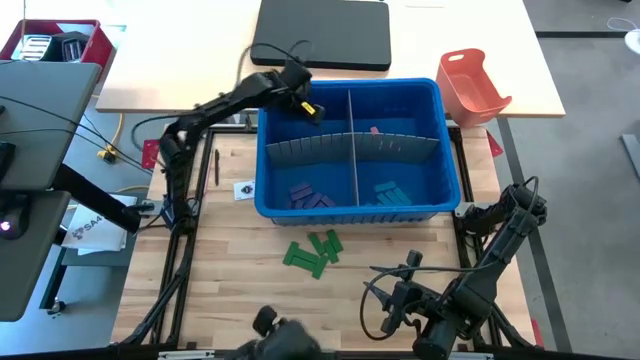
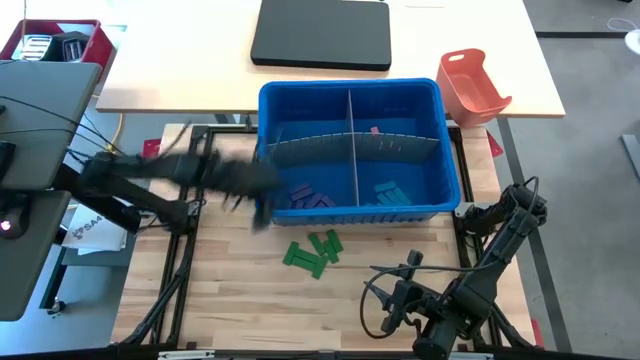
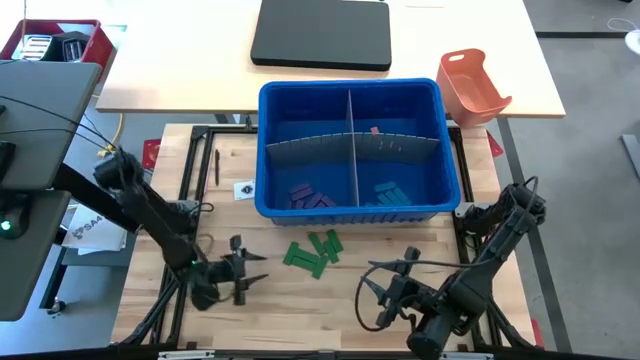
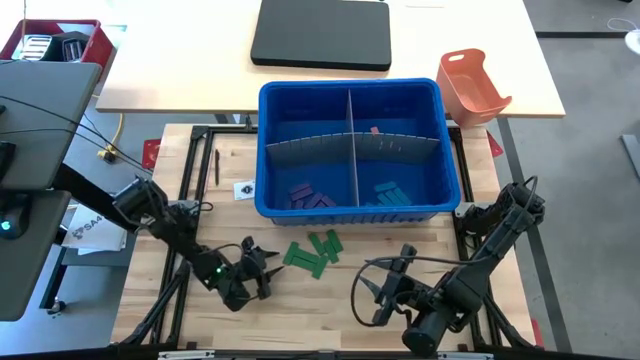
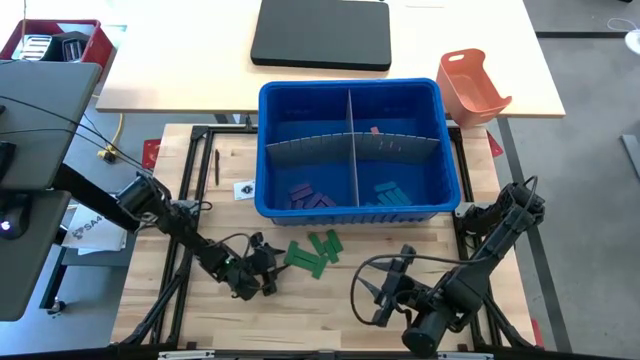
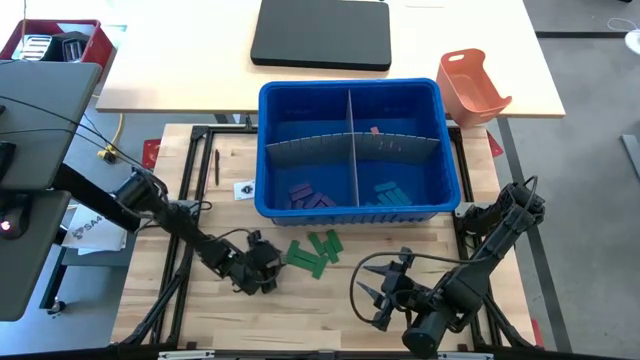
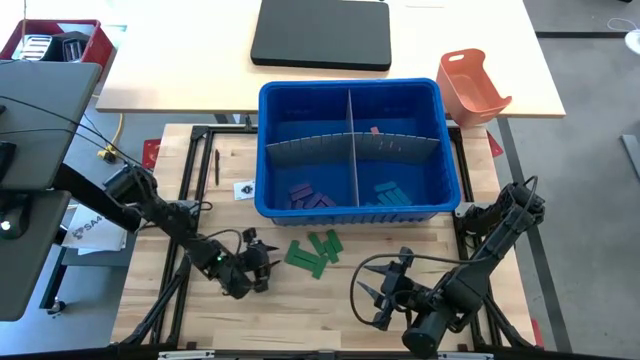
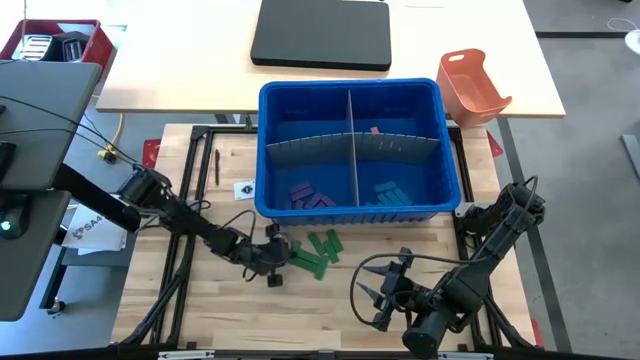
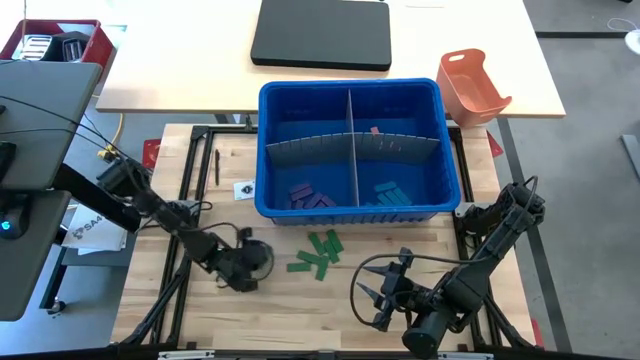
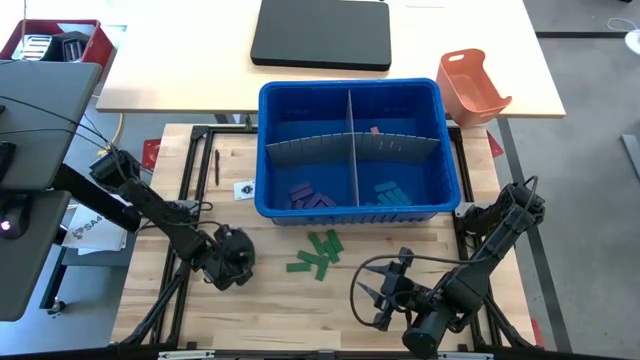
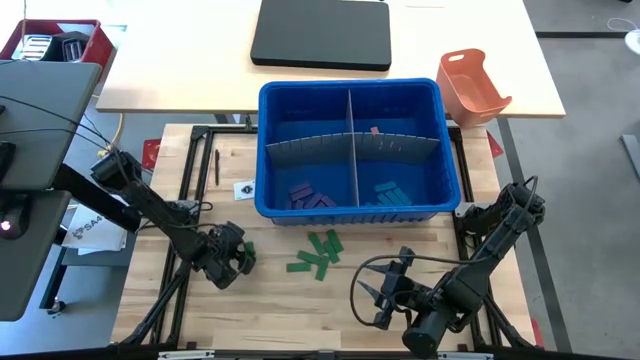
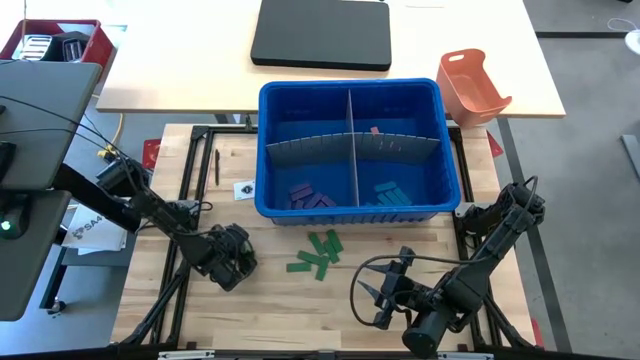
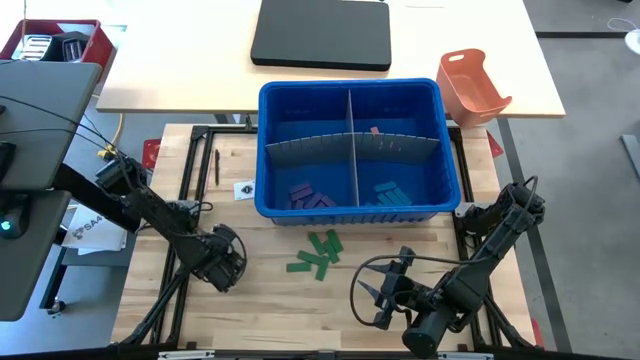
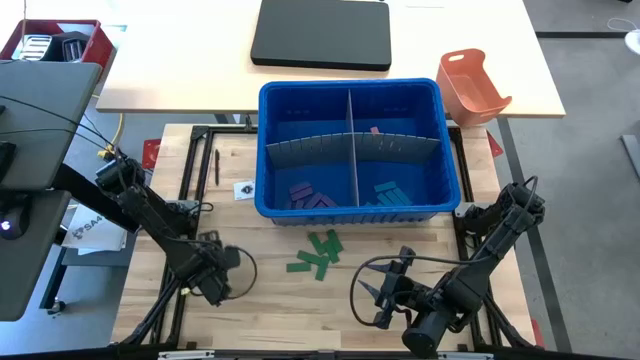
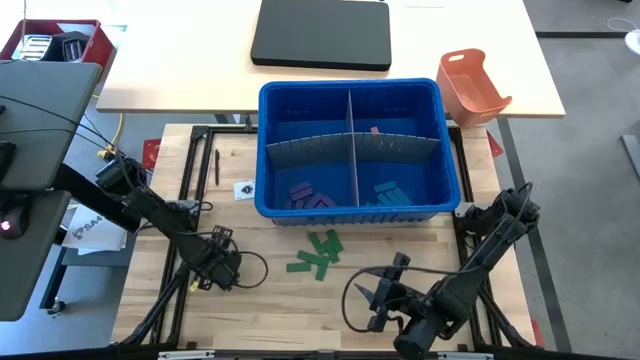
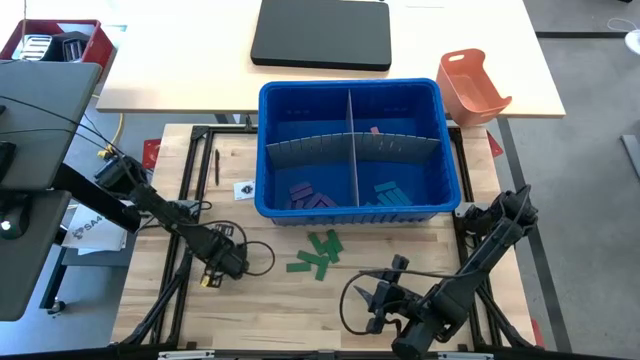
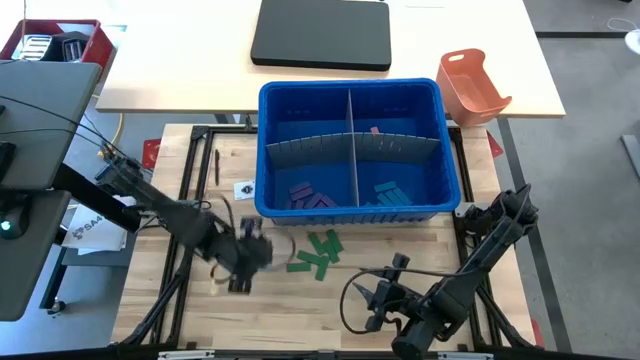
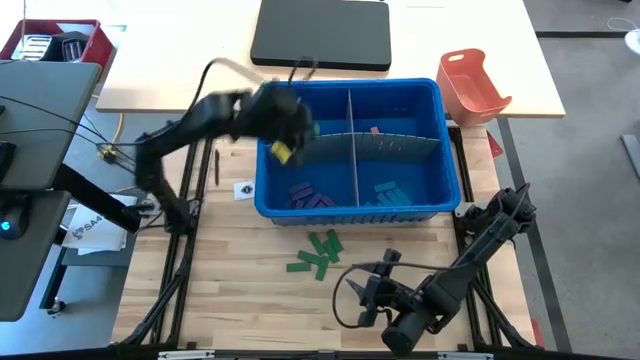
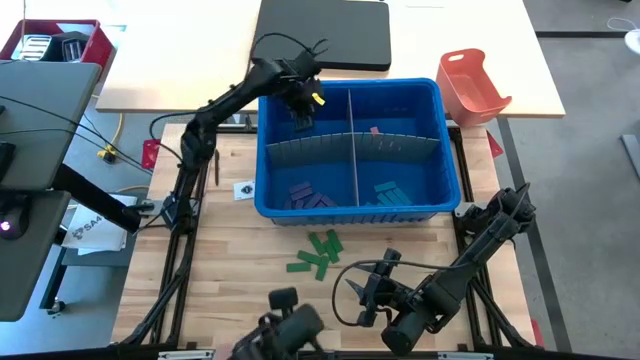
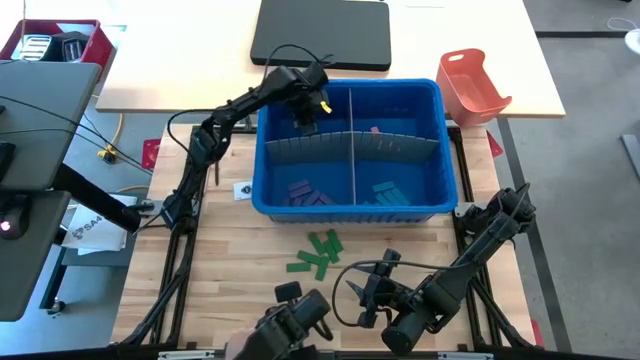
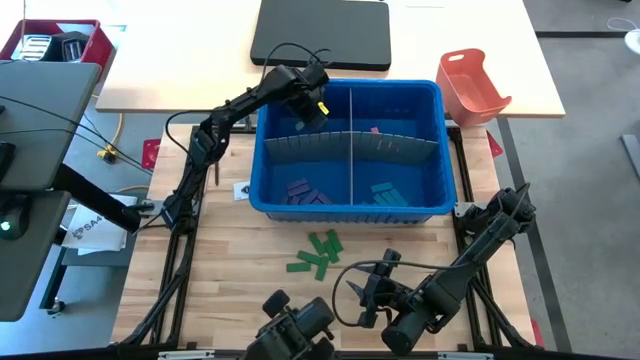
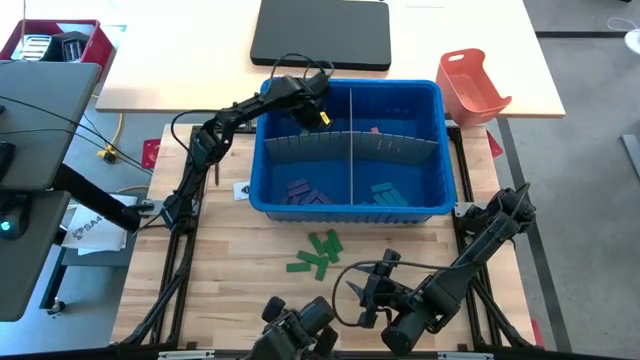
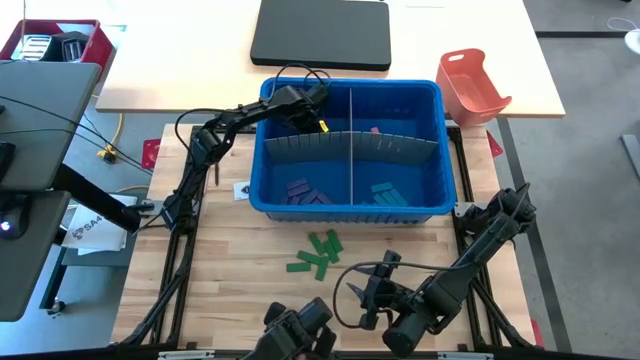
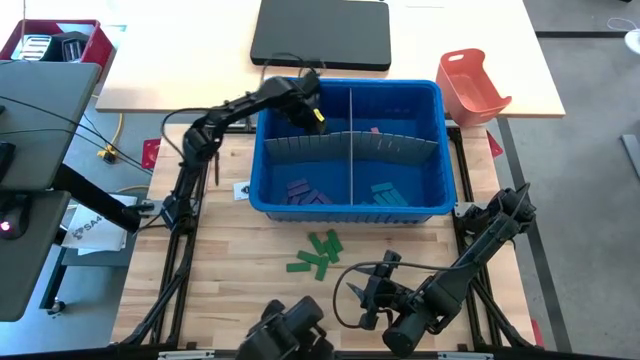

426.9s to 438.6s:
Task: Sort blocks
Put the green block into the blue bin with the other green block

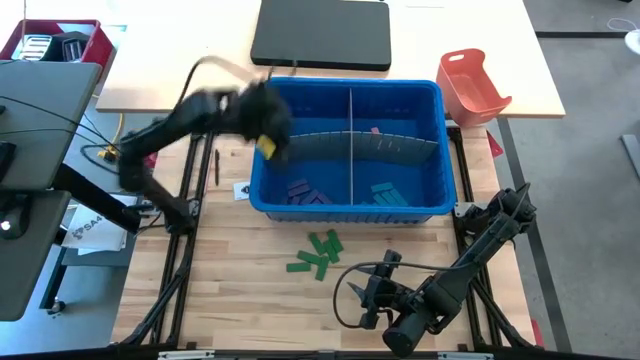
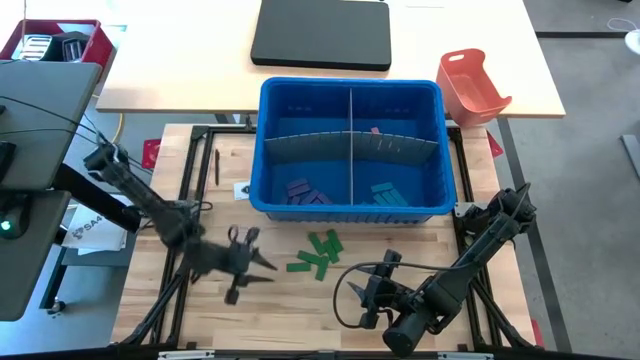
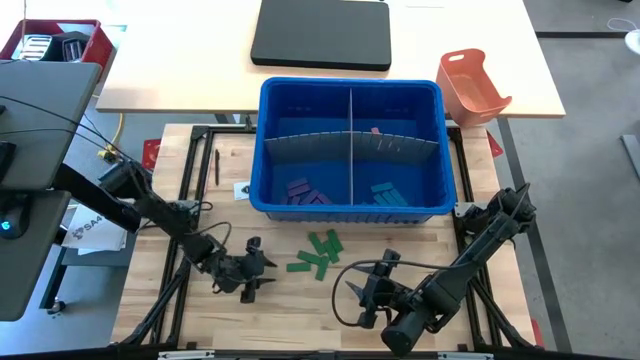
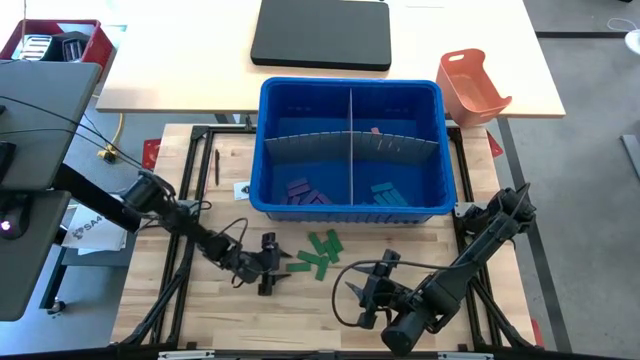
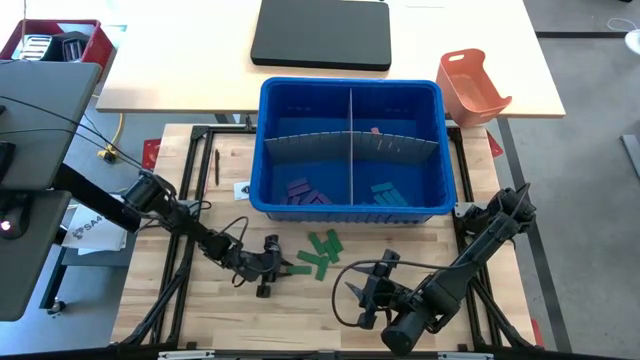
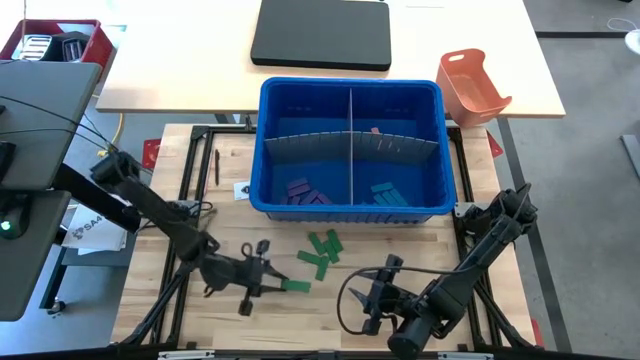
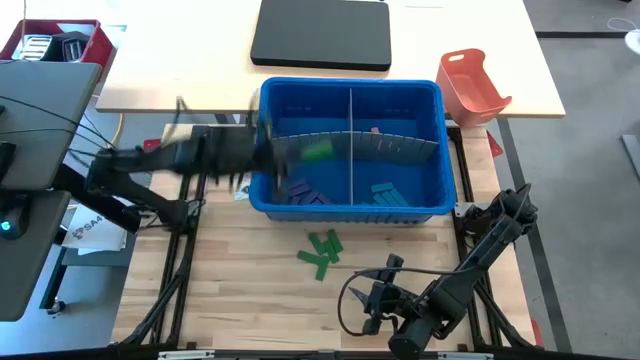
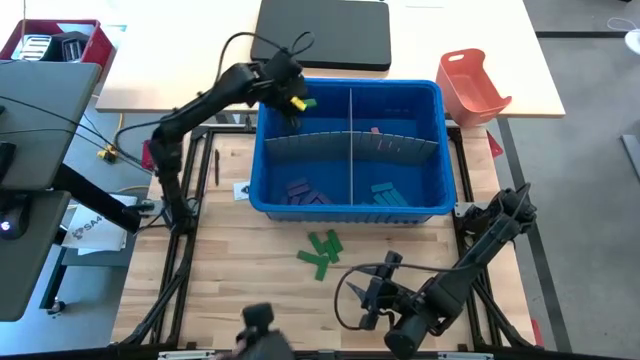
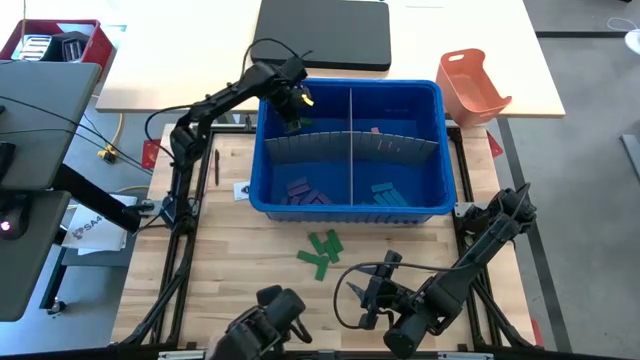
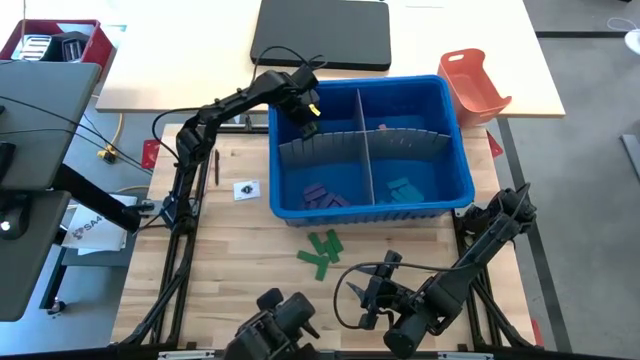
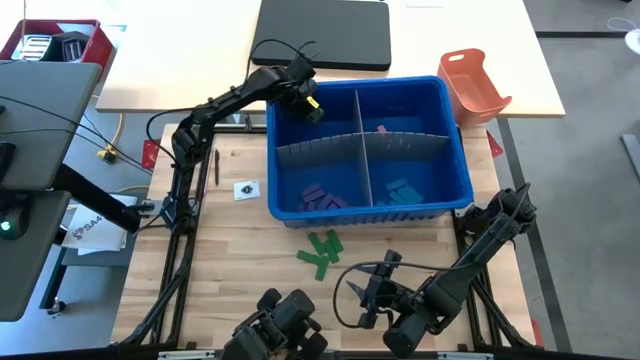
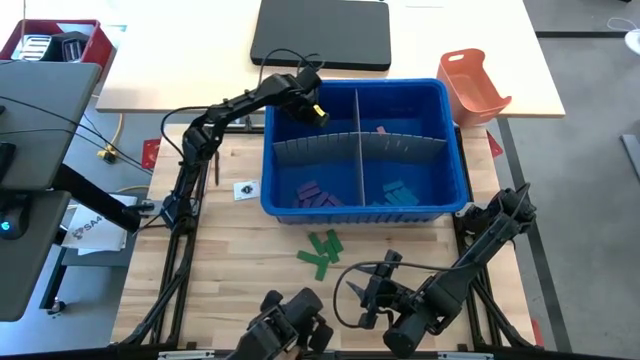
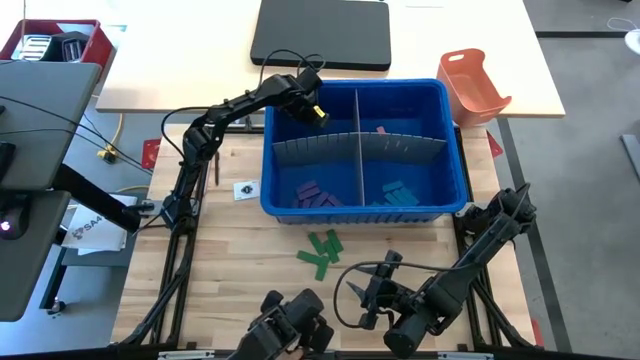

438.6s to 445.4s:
Put the green block into the blue bin with the other green block
